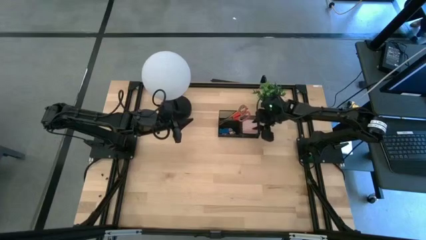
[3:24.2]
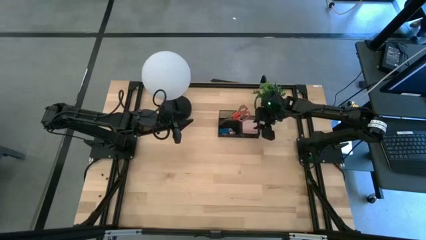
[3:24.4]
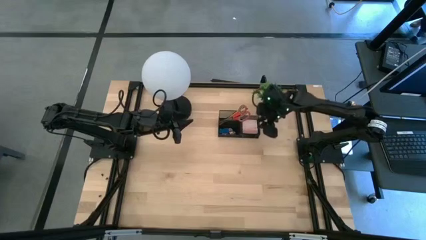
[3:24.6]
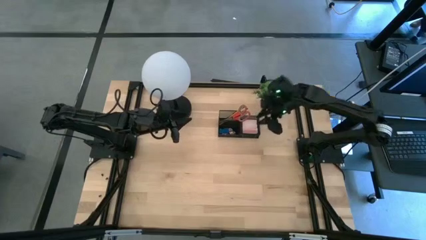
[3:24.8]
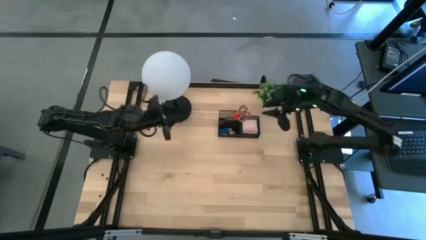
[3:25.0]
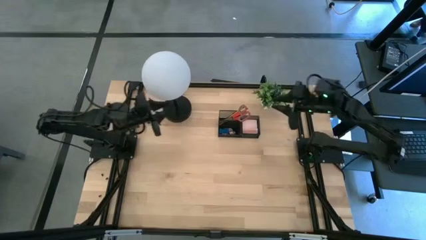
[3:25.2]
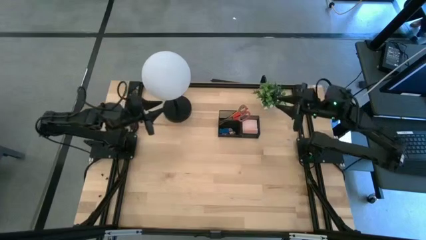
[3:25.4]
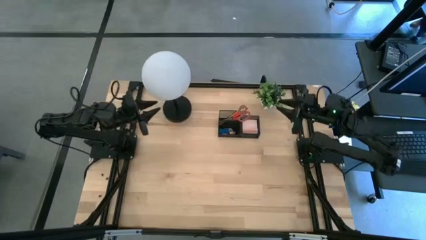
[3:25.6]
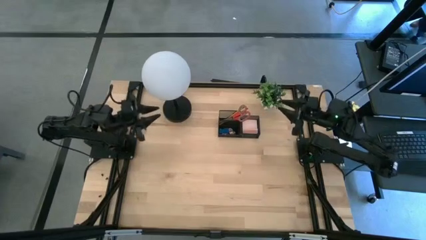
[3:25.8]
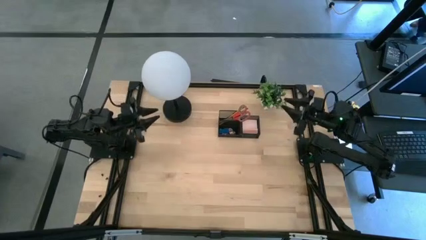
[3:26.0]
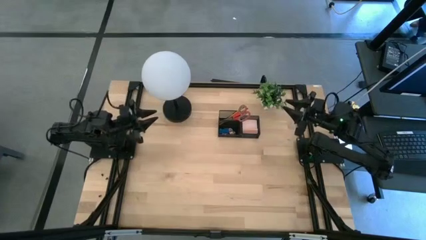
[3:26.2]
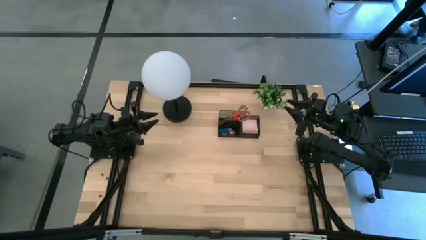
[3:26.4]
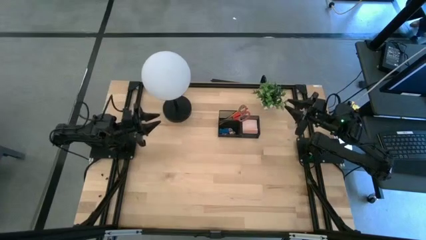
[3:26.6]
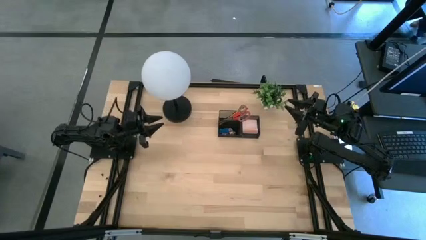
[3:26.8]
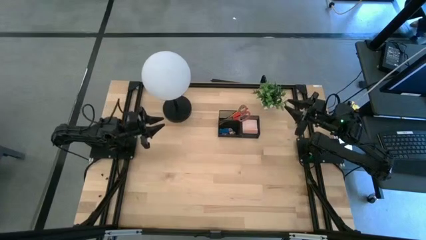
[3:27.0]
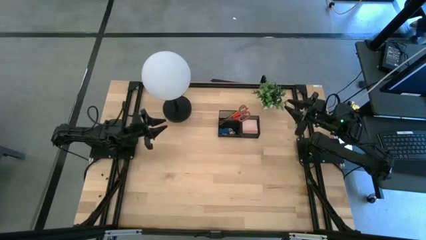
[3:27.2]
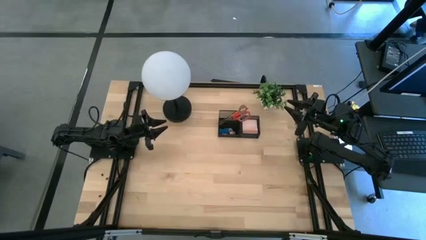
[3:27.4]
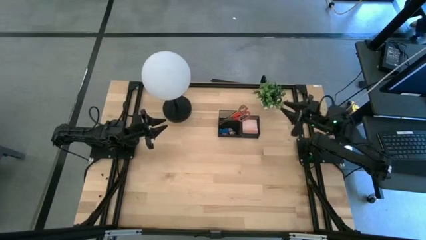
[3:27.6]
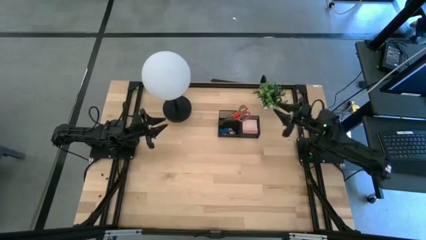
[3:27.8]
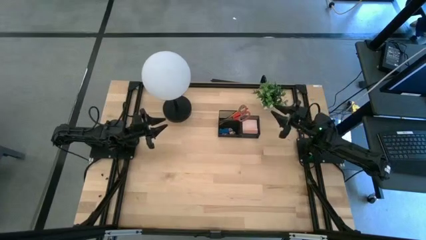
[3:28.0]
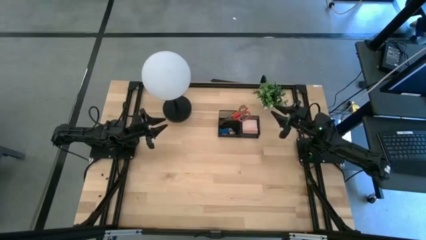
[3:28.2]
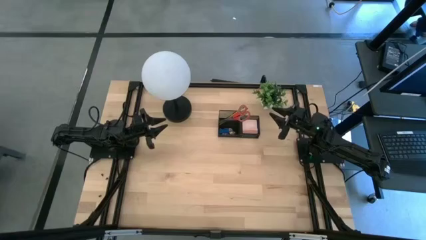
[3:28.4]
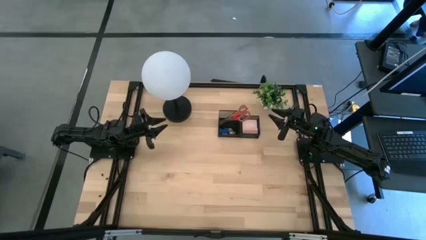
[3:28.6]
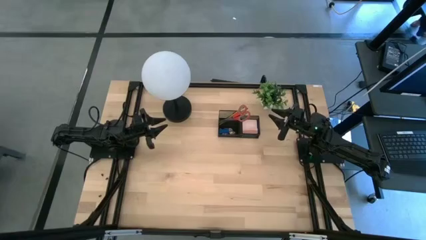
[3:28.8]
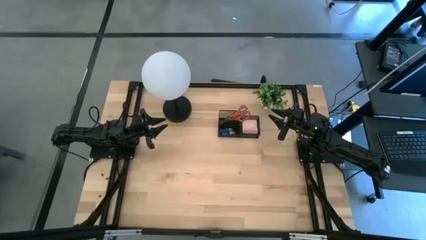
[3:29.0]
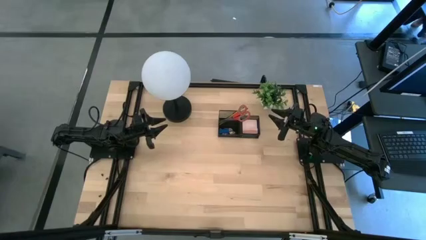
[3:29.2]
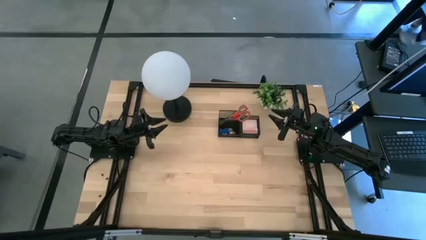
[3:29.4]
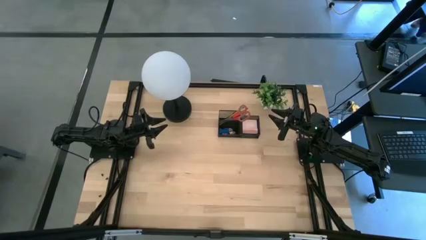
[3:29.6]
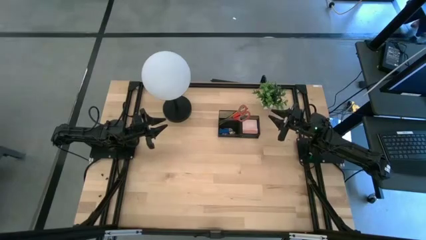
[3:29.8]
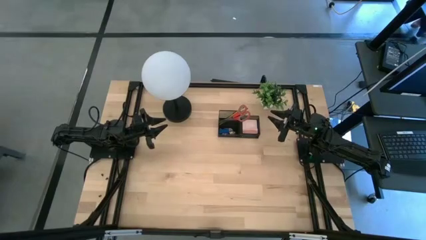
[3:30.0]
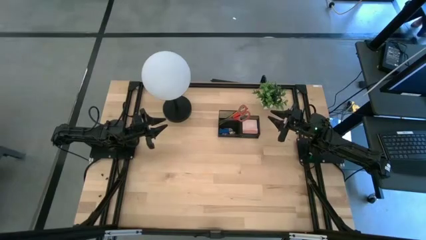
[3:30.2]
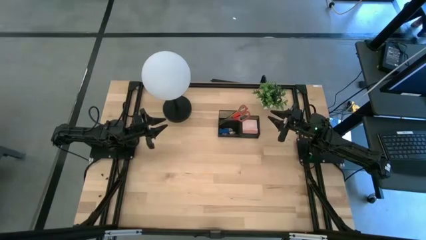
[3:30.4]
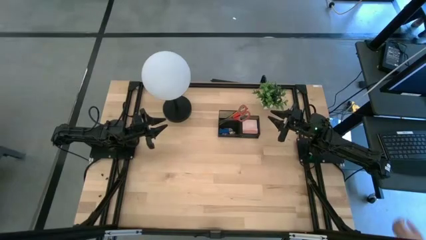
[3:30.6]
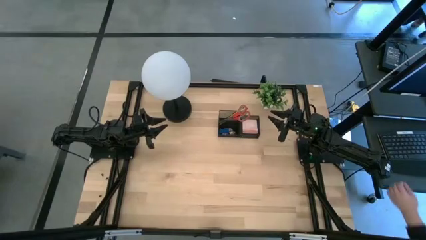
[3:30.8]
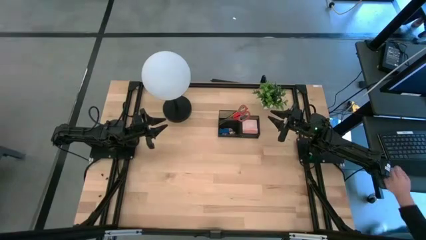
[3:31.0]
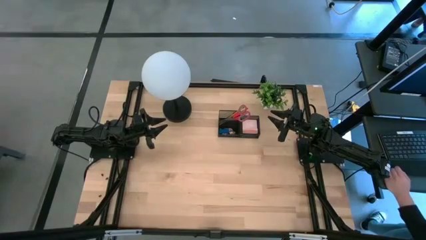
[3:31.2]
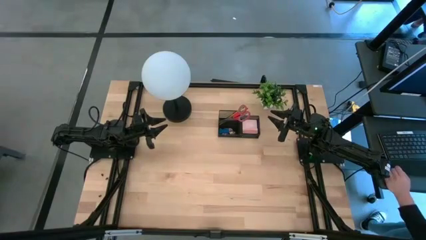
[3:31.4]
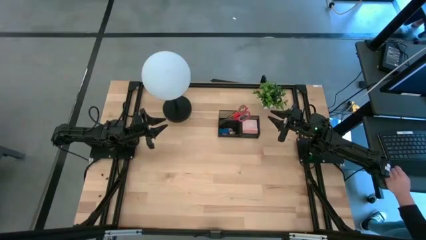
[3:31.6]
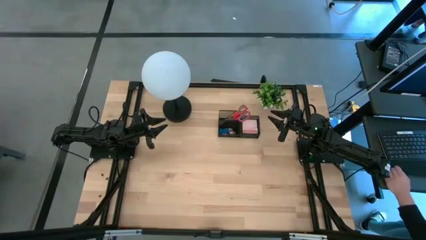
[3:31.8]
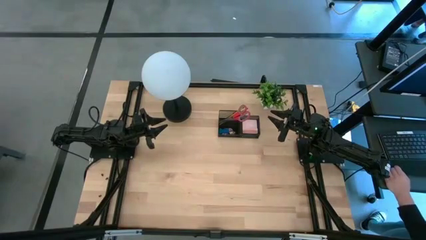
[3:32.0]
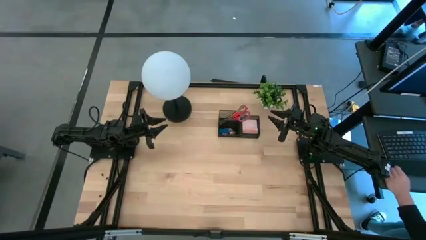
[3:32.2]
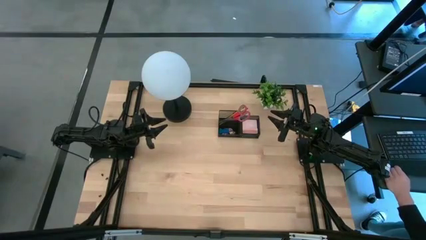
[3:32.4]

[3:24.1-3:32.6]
Task: Pick and place office supplies into organizer
Return to Home Position
